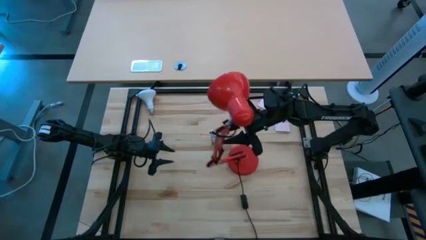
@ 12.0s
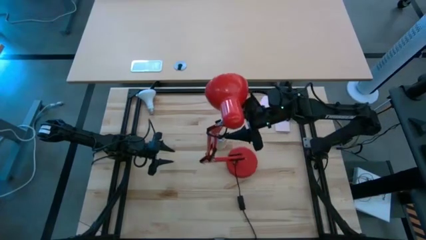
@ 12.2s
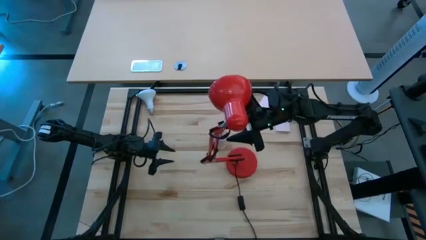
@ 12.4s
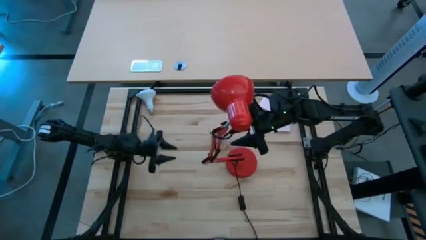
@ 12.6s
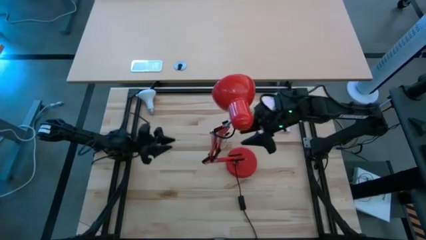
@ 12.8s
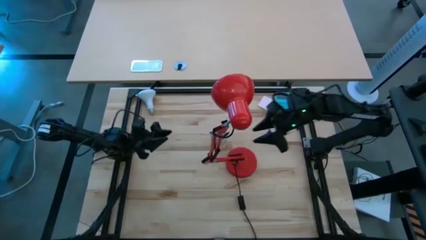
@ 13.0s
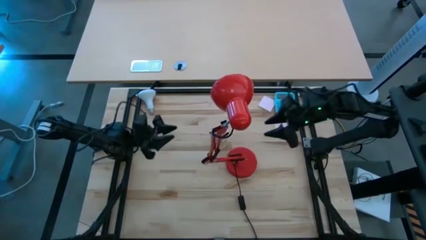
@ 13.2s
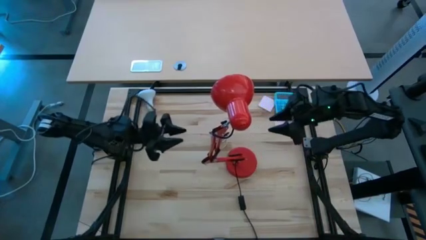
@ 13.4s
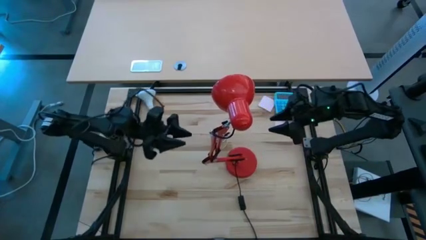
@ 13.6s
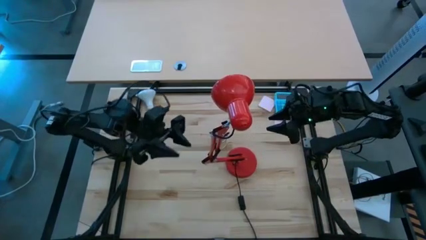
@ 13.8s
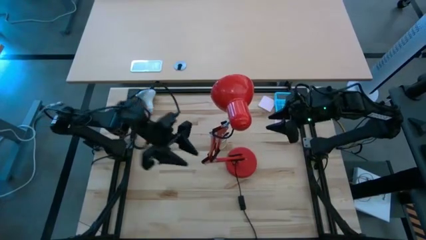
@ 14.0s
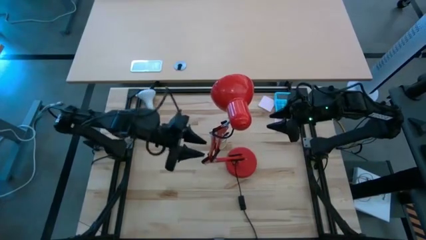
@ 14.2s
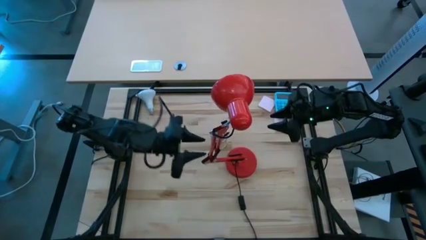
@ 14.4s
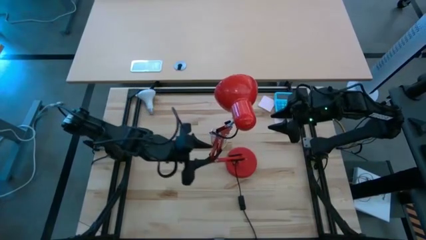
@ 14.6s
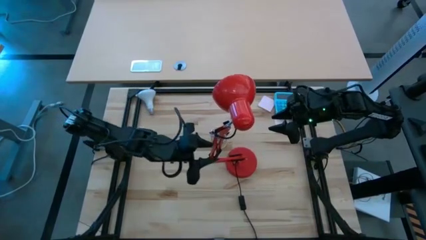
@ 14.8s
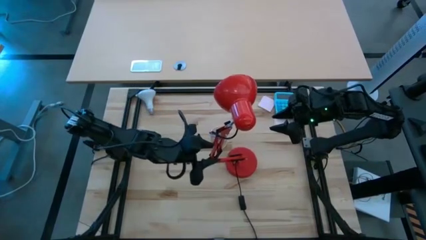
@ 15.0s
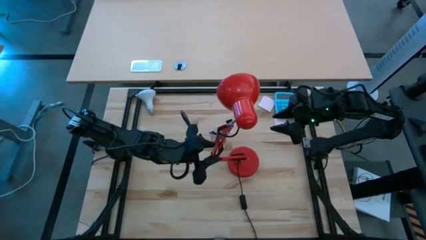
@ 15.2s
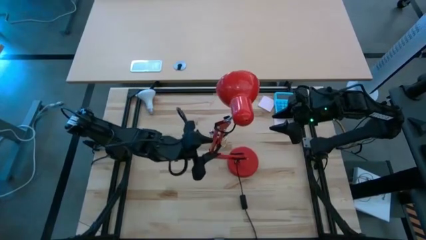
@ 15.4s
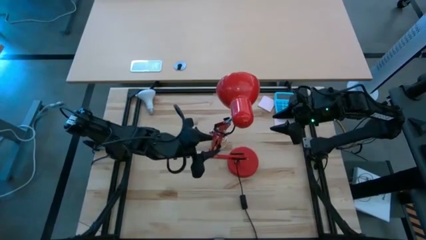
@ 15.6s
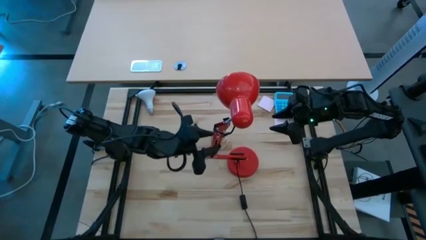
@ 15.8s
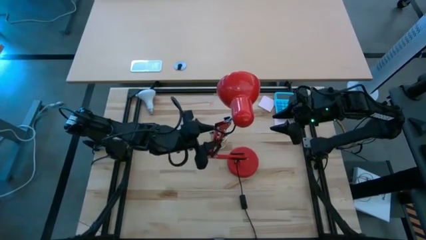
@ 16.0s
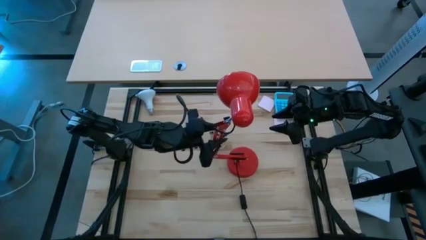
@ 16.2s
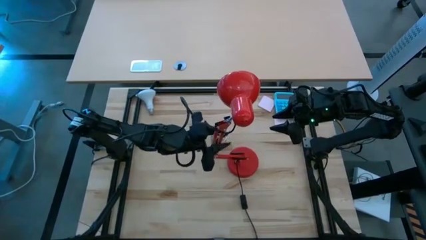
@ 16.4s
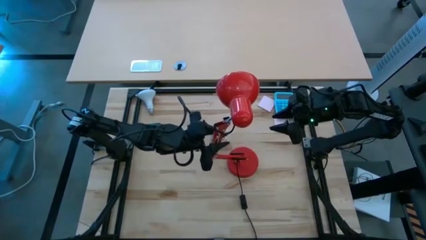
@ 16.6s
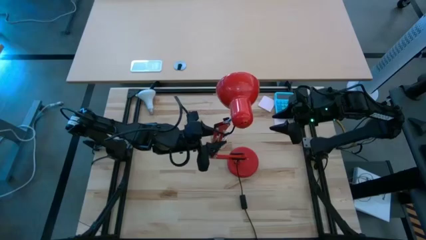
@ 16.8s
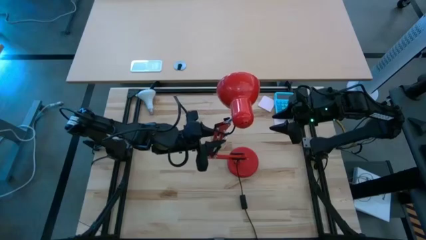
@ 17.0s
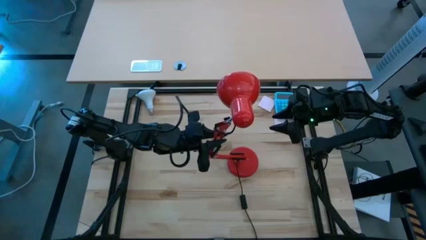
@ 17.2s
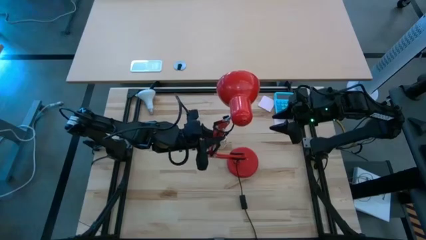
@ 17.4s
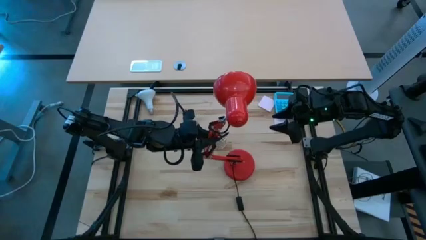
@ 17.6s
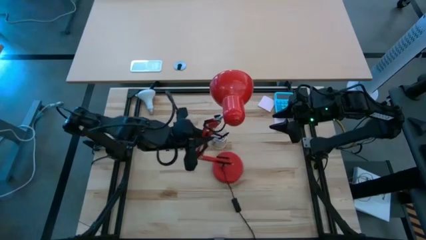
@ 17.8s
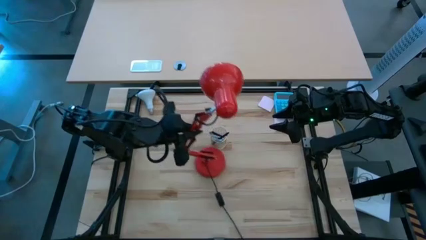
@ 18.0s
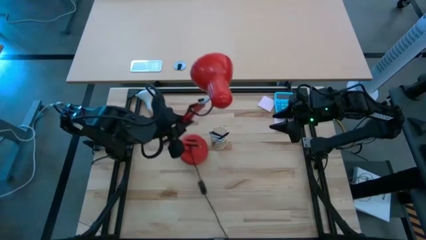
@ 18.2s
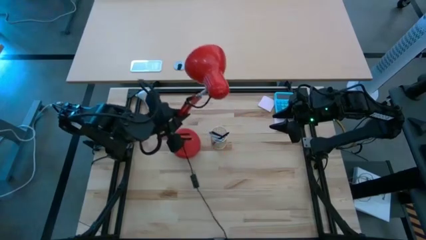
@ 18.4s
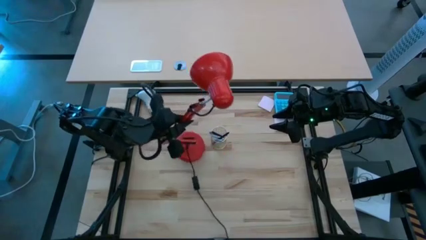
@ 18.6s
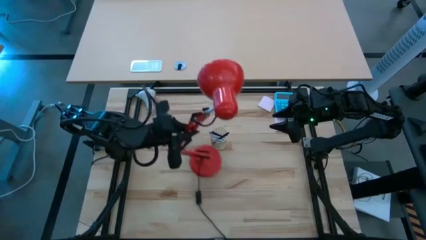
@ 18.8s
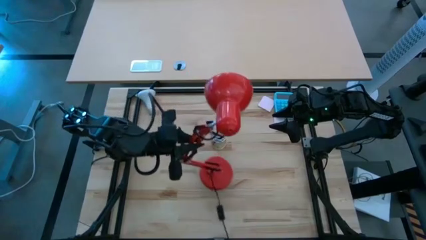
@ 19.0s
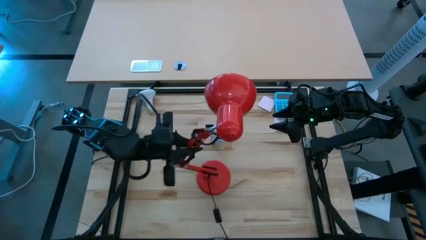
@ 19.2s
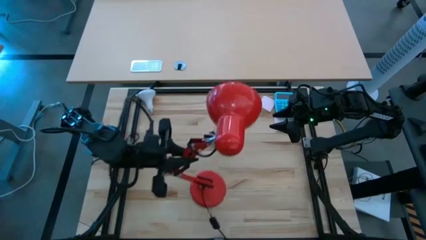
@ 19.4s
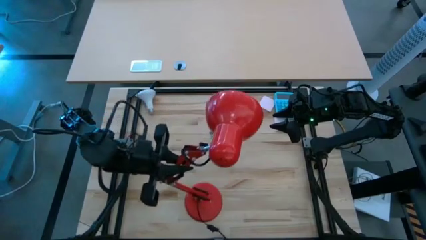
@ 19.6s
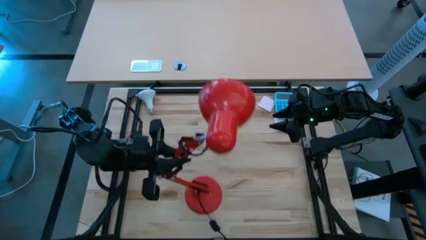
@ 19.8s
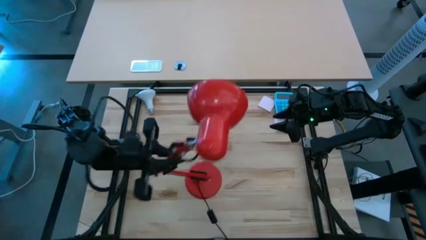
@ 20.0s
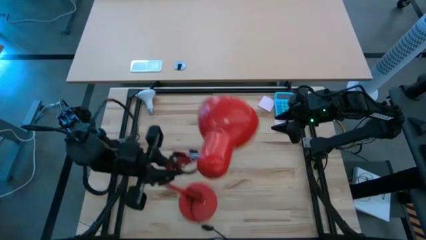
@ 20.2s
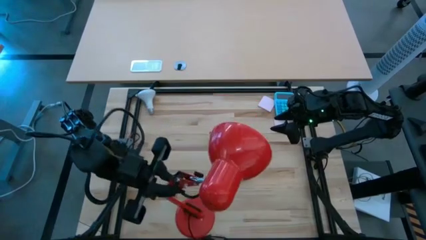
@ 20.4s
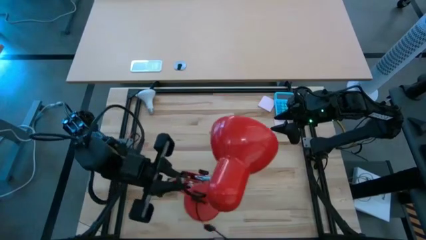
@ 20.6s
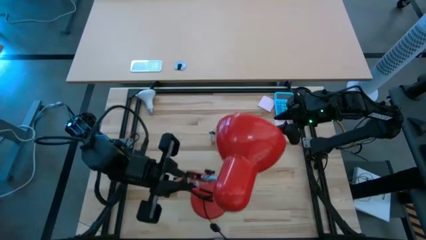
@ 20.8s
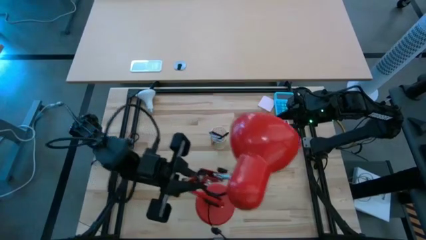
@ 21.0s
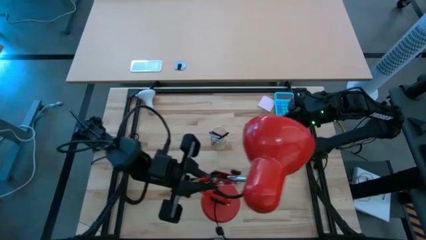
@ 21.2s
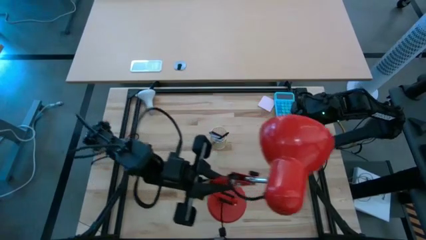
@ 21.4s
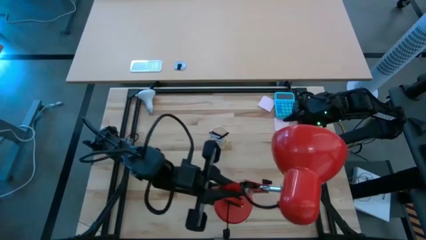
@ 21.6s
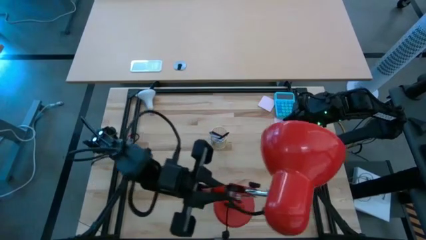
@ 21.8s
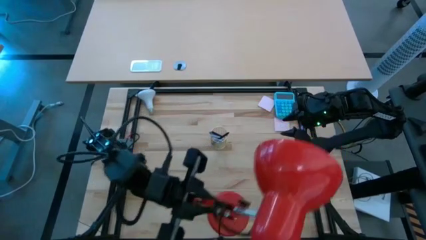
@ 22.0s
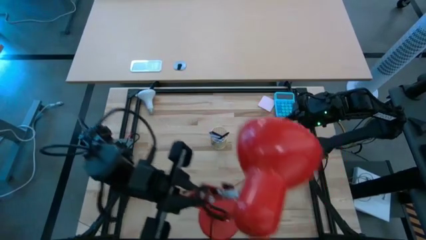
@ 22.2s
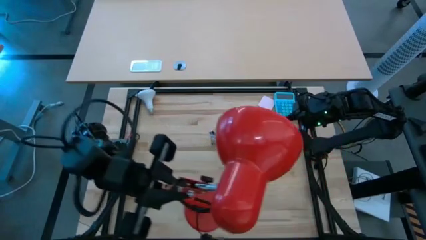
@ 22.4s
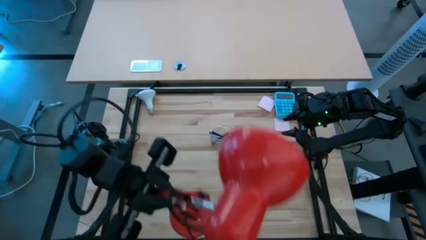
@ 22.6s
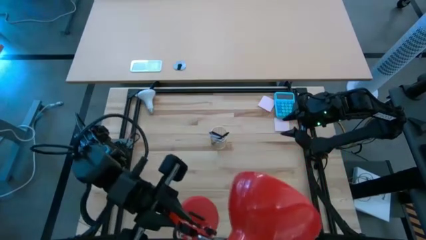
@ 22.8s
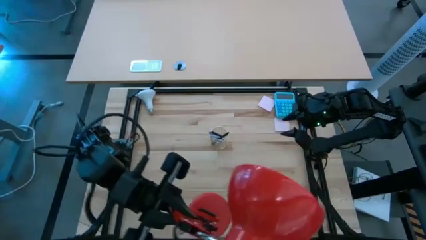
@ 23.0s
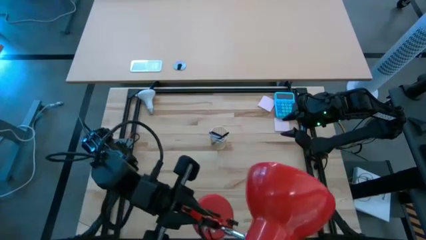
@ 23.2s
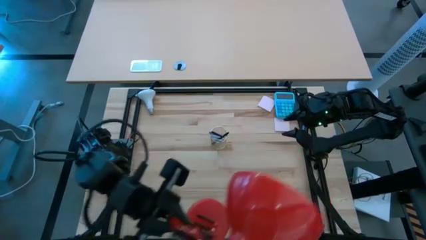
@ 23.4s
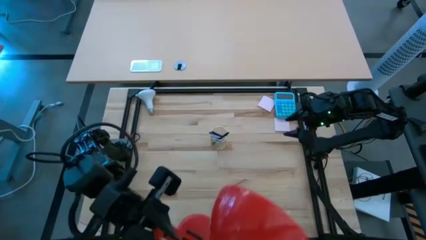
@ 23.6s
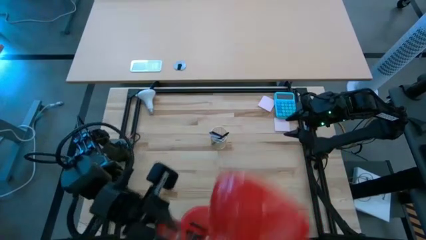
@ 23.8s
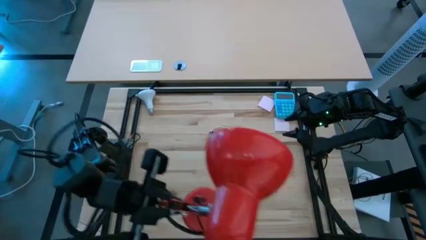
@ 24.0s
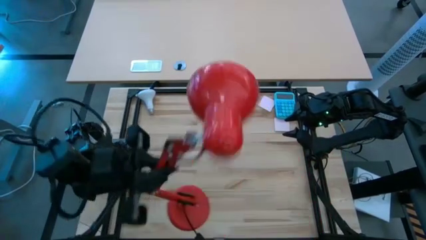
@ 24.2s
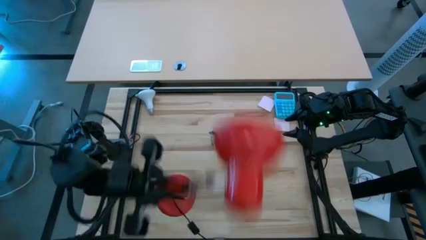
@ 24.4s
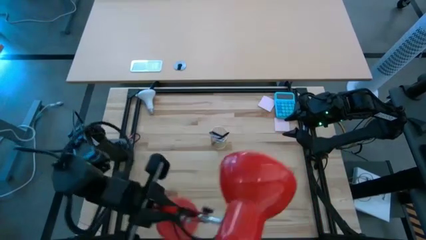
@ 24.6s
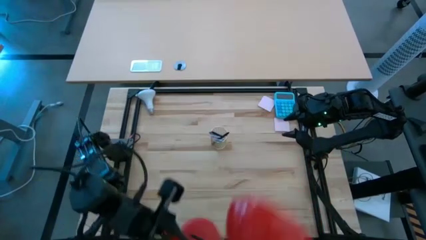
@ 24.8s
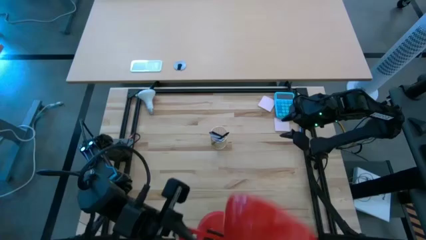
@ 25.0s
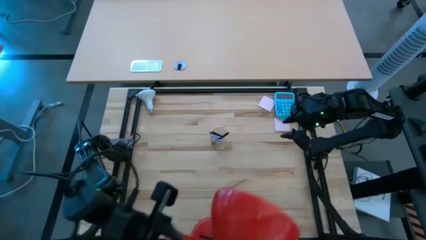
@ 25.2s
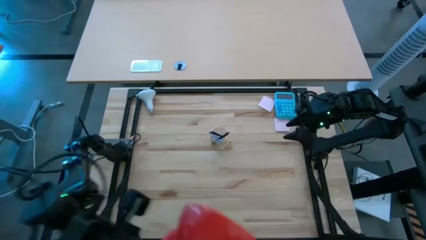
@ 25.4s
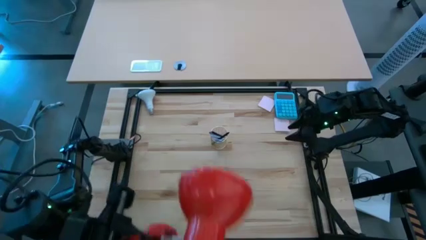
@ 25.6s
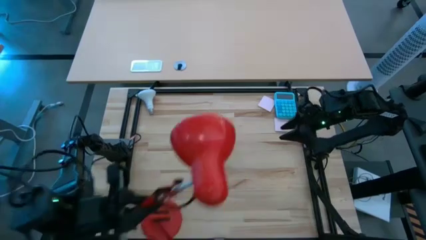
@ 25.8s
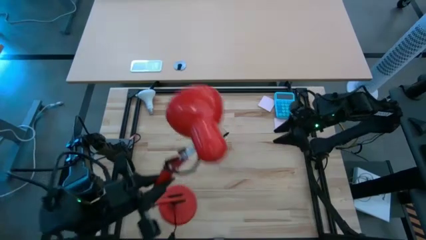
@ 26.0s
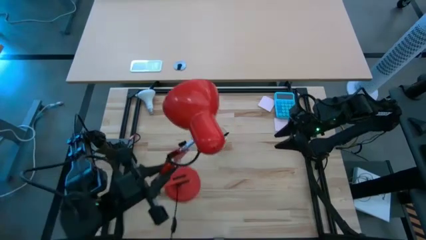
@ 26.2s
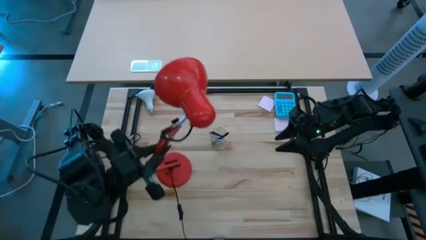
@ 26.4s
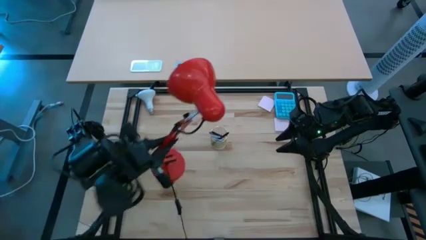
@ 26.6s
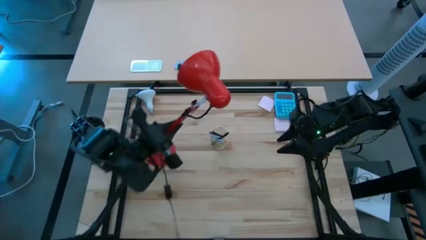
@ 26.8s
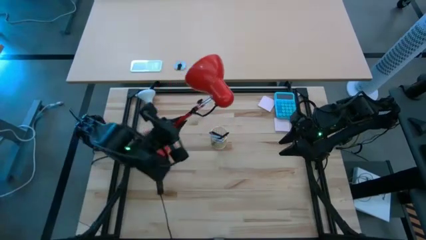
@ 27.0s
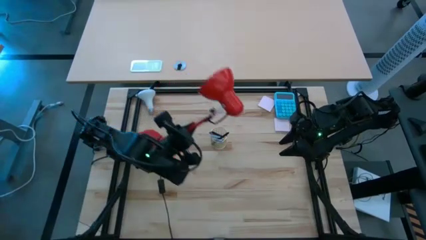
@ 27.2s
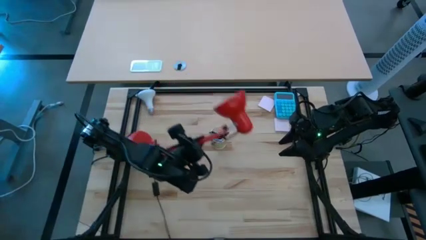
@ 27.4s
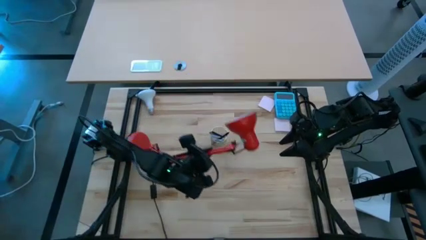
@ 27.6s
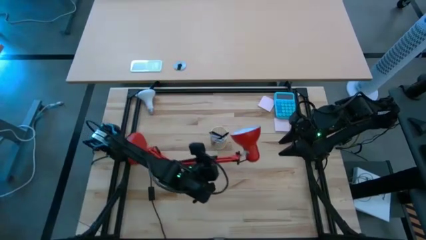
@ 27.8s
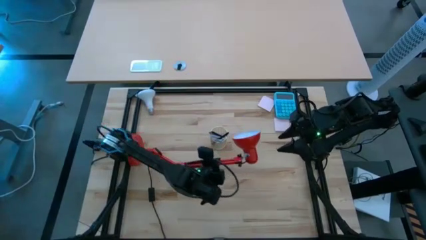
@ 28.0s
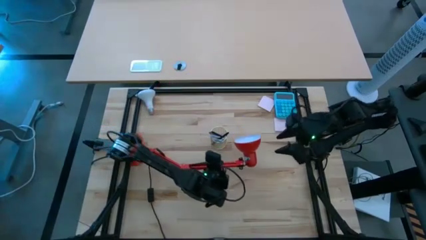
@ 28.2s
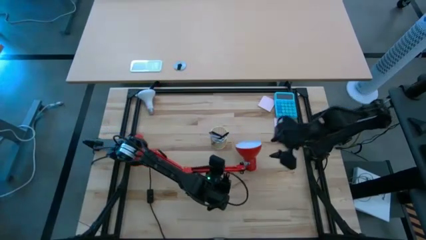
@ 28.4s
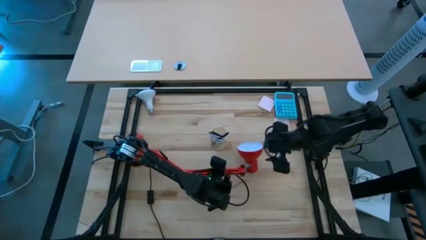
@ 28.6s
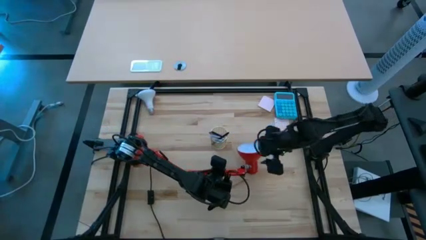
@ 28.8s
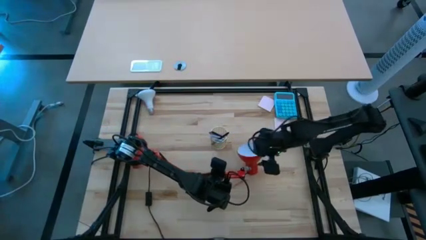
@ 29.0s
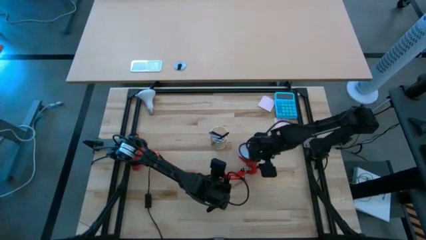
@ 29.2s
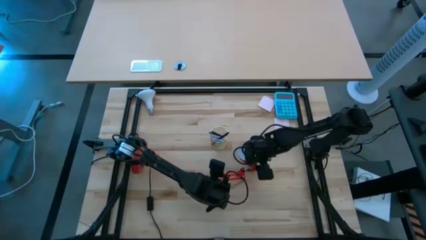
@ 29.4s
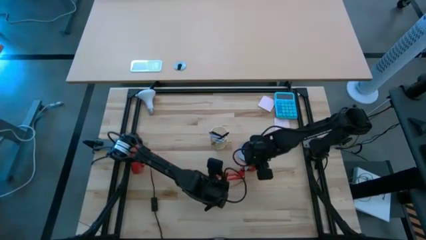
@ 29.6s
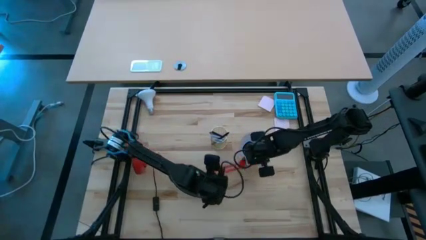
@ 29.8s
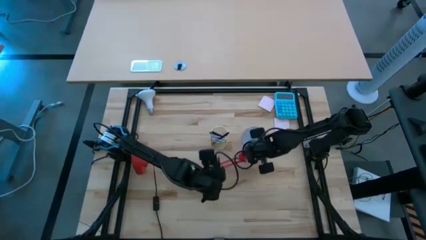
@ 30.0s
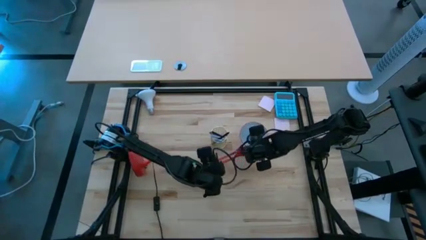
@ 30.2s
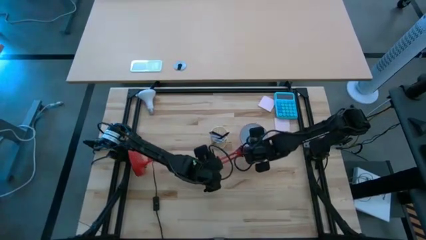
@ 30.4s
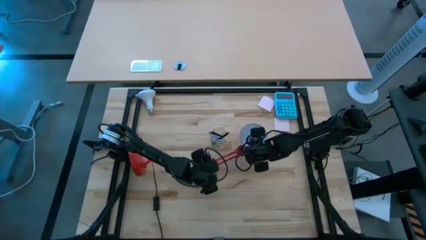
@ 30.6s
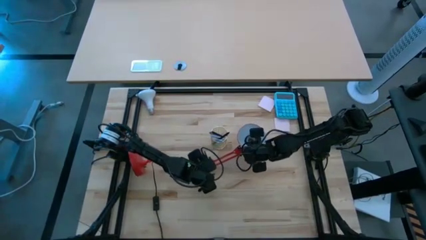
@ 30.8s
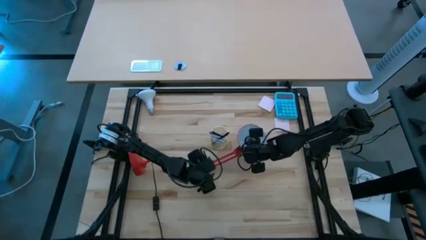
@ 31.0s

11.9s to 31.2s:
Task: Screw lightbulb
Prepare the lamp to insert the light bulb
